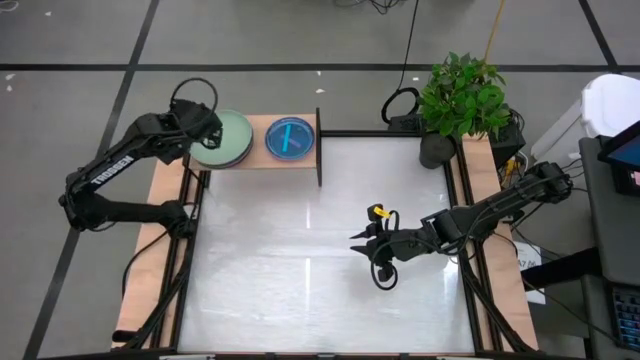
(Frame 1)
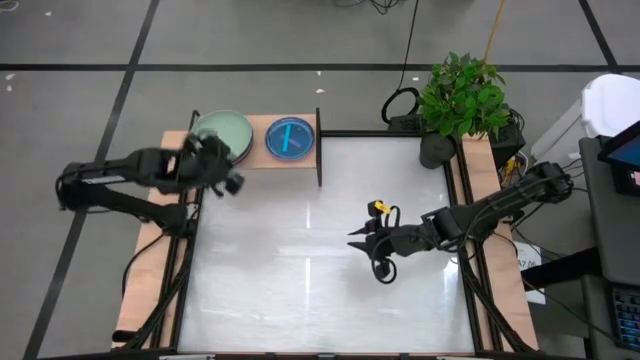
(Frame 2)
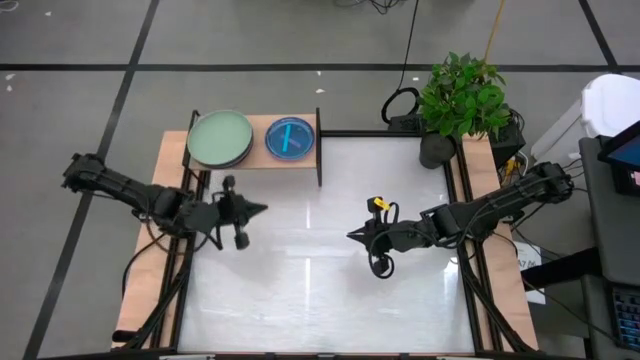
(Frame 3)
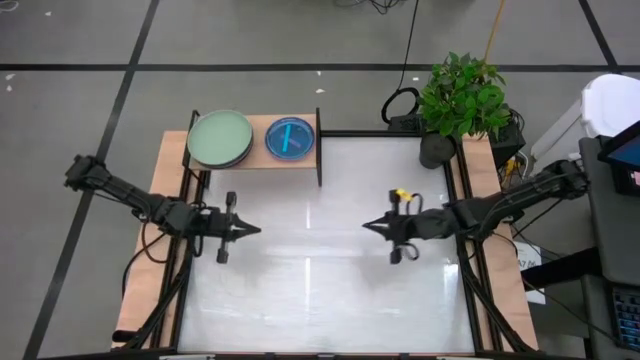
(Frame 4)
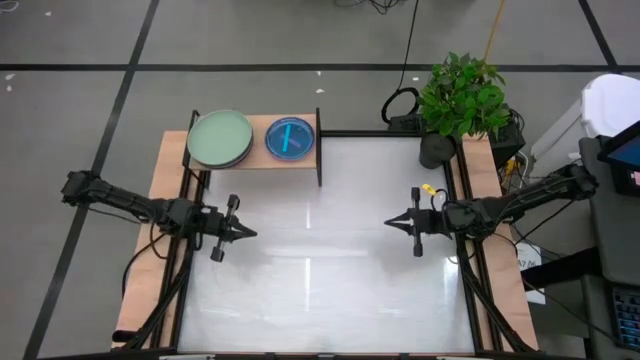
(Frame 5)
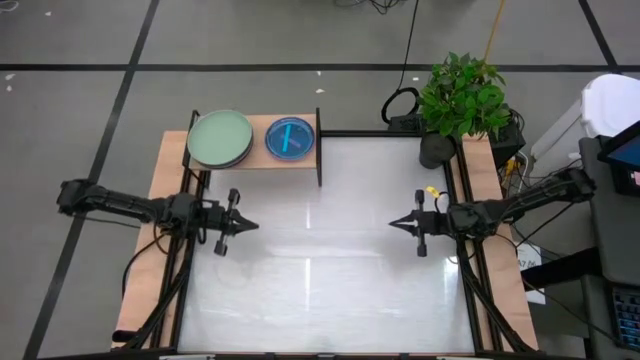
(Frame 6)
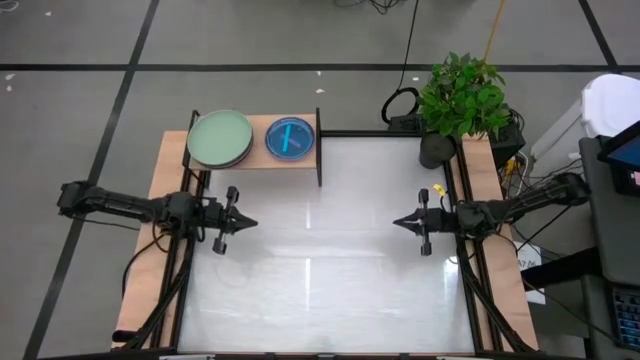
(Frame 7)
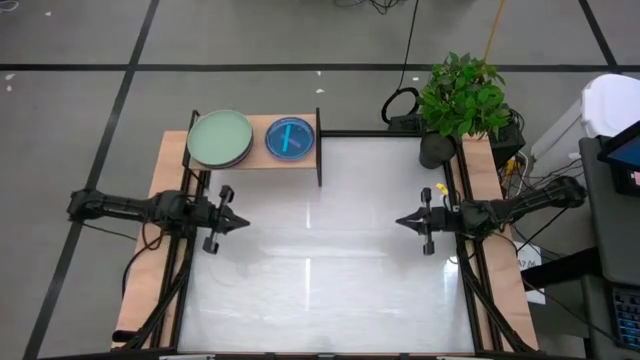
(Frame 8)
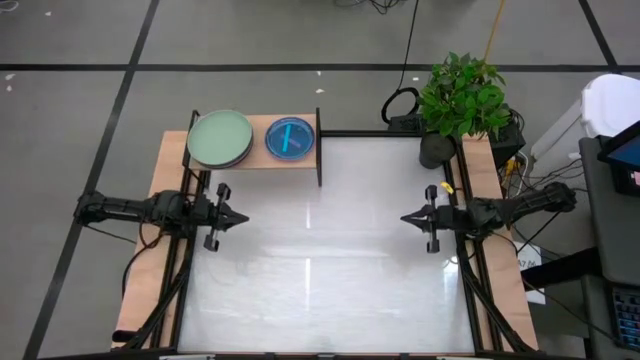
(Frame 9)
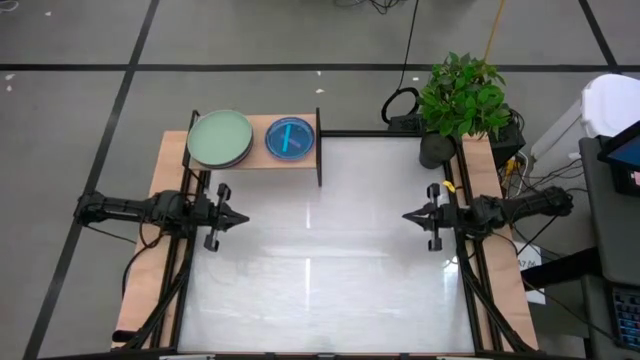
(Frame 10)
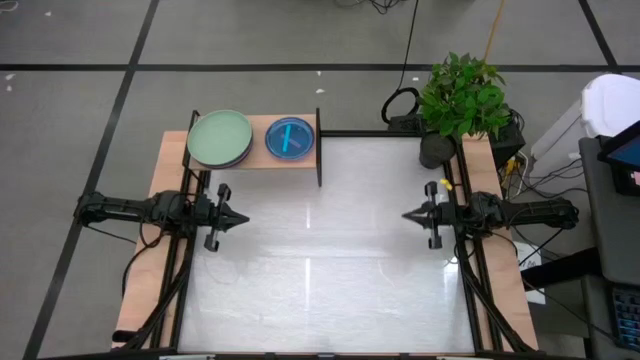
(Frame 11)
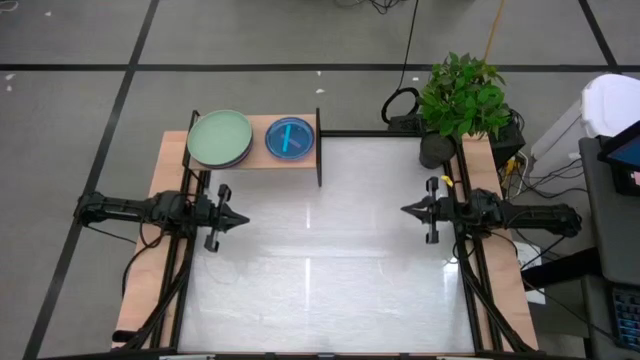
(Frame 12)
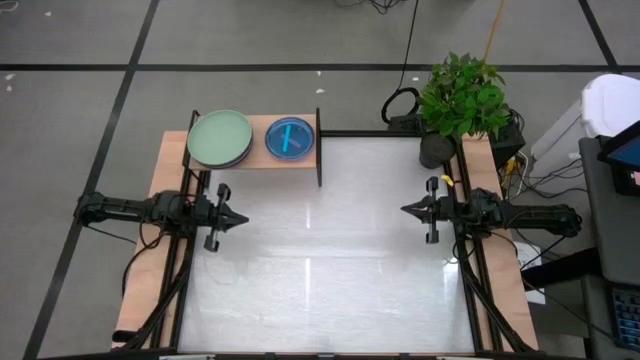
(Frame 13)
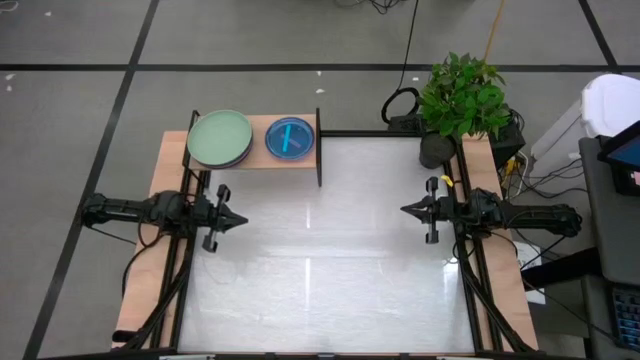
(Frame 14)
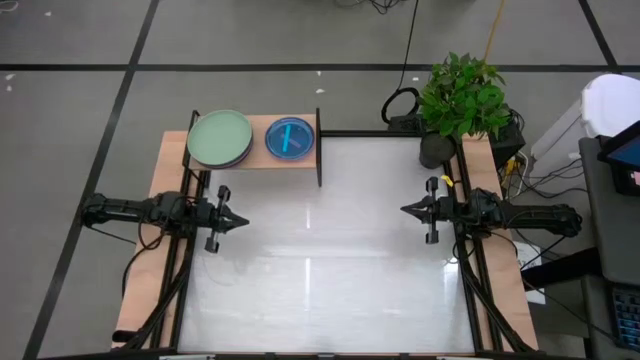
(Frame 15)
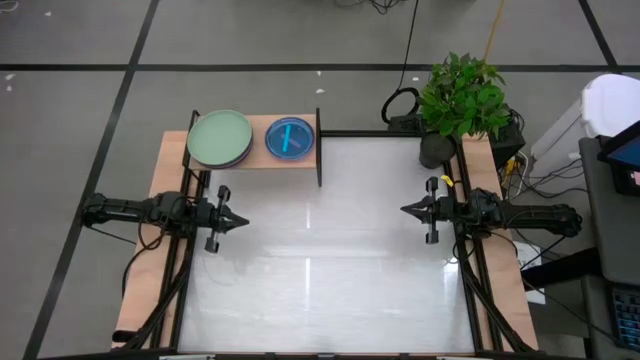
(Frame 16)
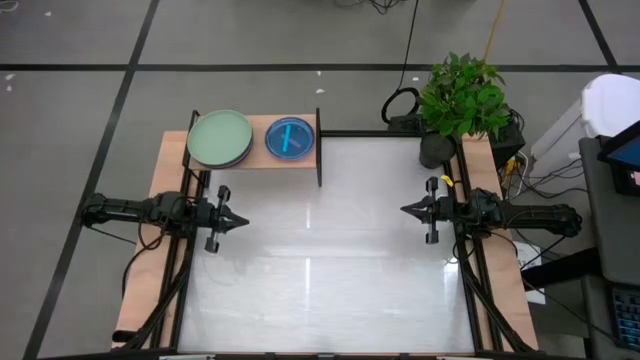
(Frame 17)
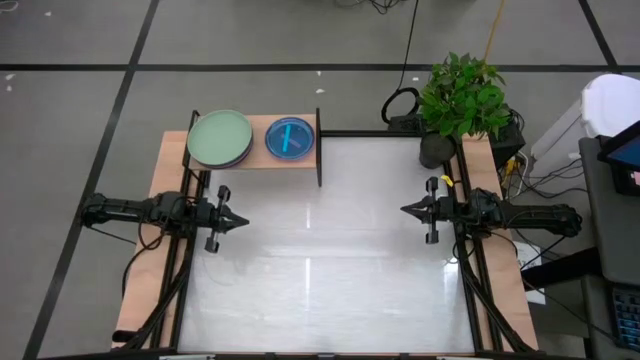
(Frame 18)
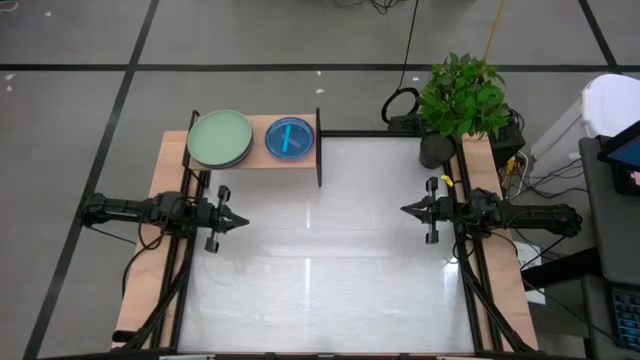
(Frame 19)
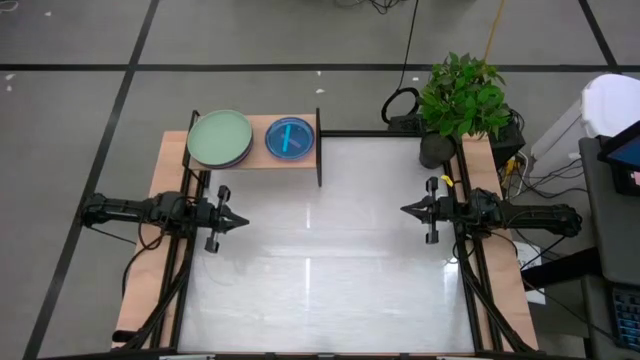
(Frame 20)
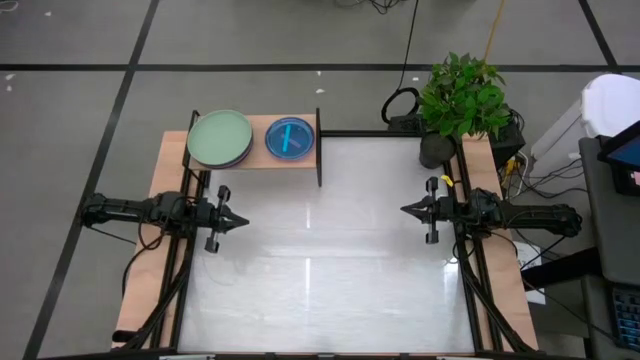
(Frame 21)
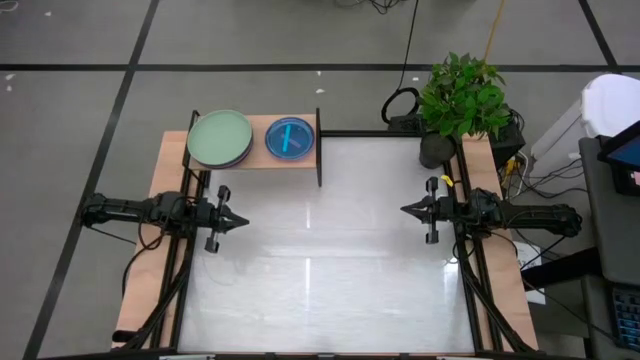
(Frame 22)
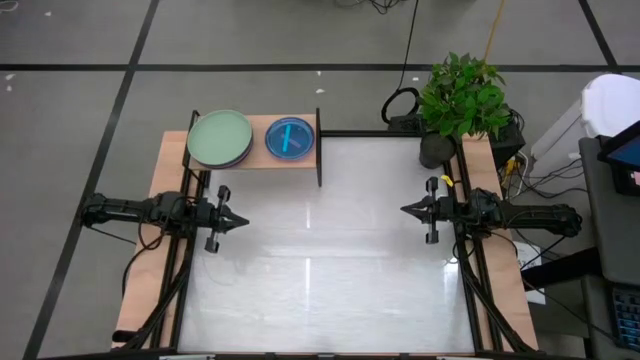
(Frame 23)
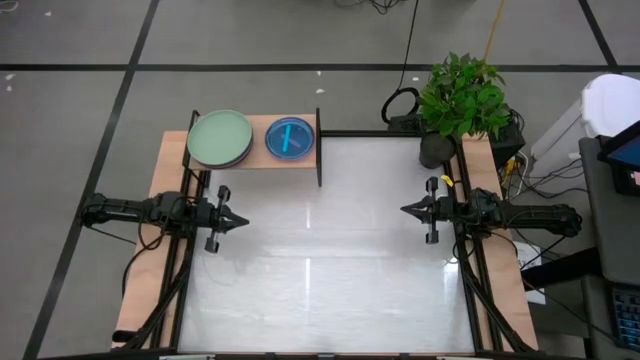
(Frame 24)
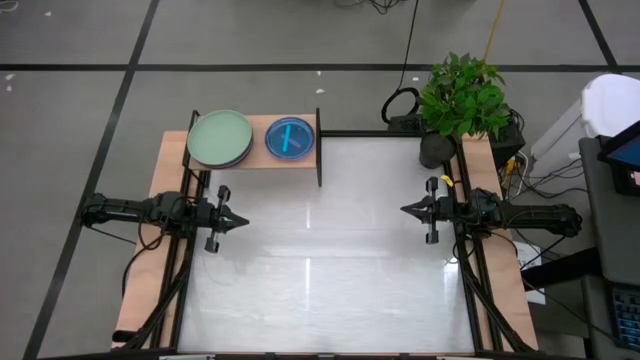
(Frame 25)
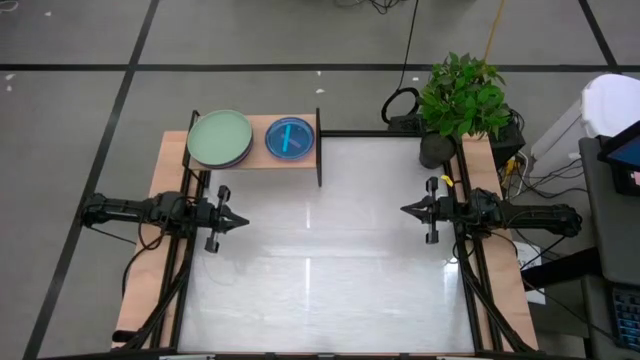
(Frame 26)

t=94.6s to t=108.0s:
Task: Place and stack plates onto a shelf
Return to Home Position

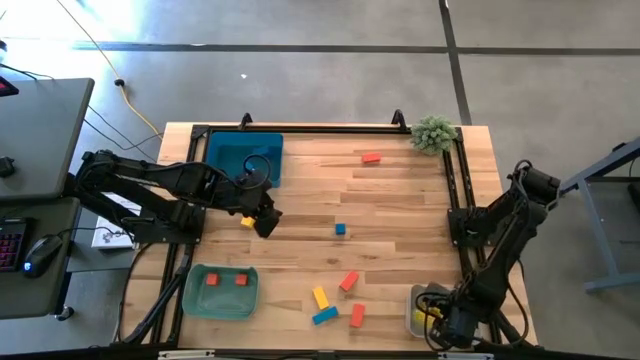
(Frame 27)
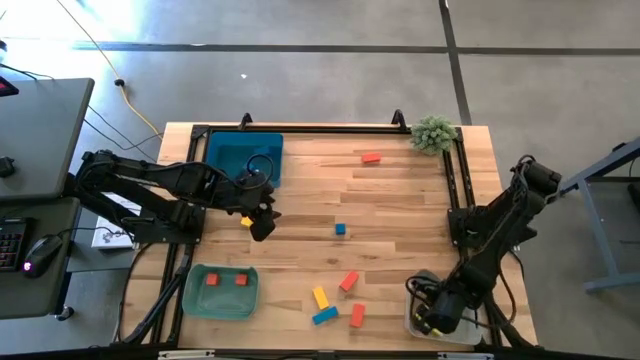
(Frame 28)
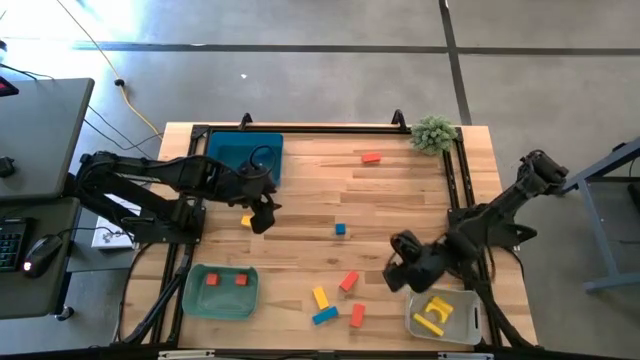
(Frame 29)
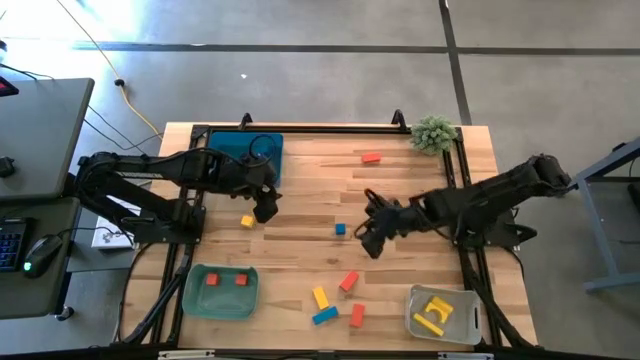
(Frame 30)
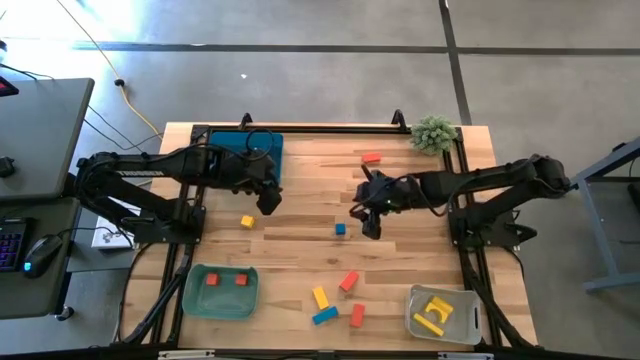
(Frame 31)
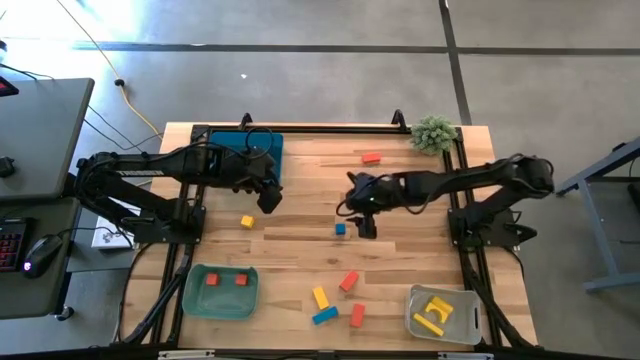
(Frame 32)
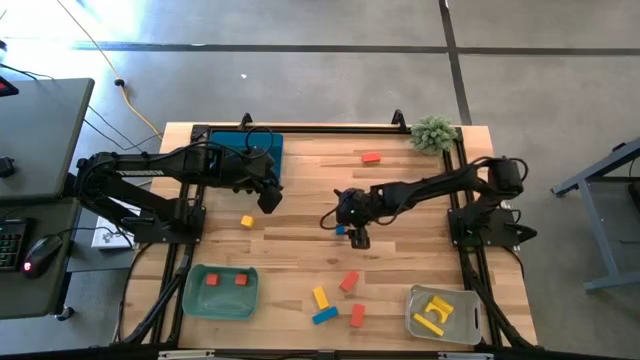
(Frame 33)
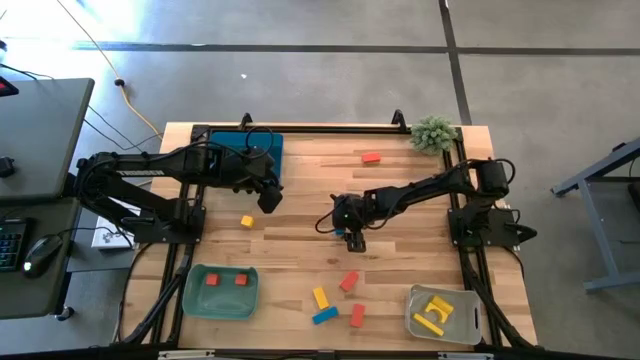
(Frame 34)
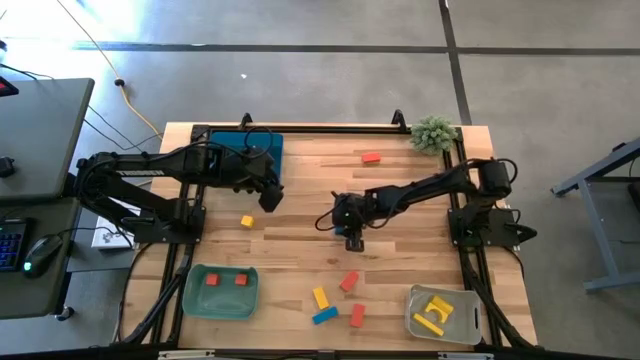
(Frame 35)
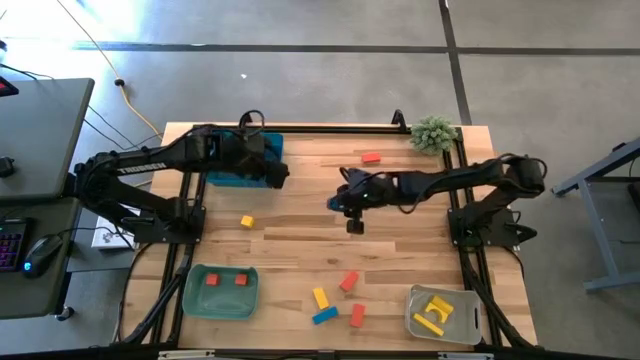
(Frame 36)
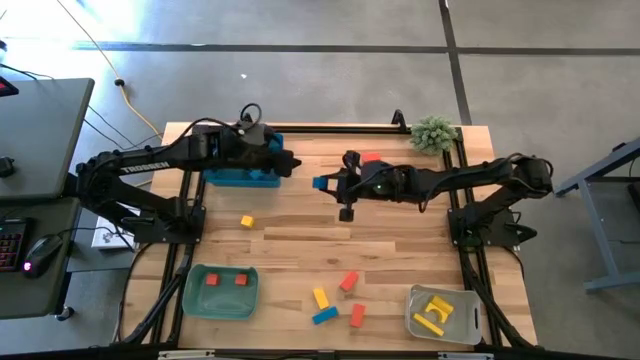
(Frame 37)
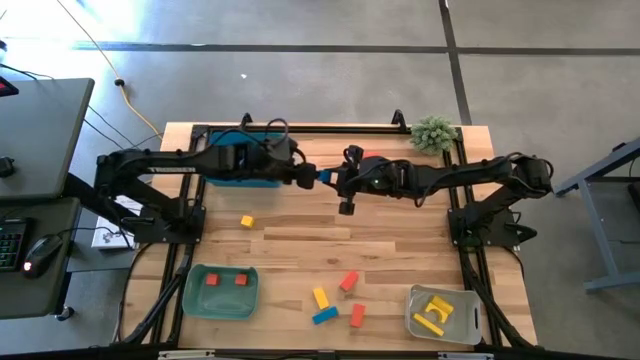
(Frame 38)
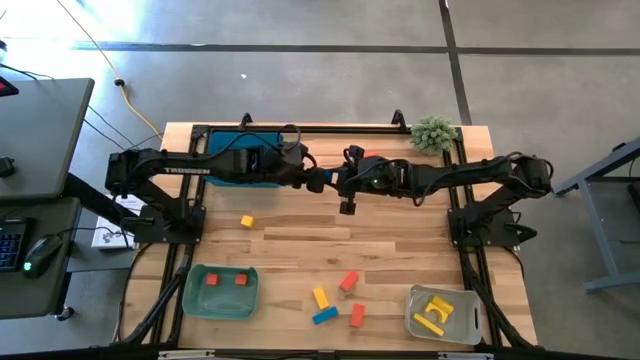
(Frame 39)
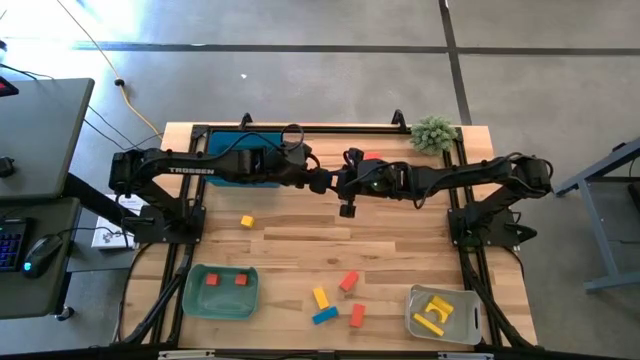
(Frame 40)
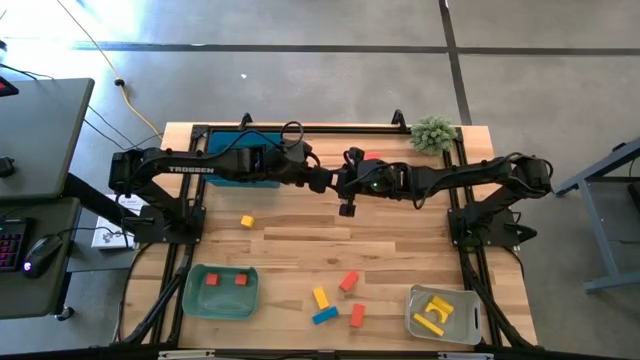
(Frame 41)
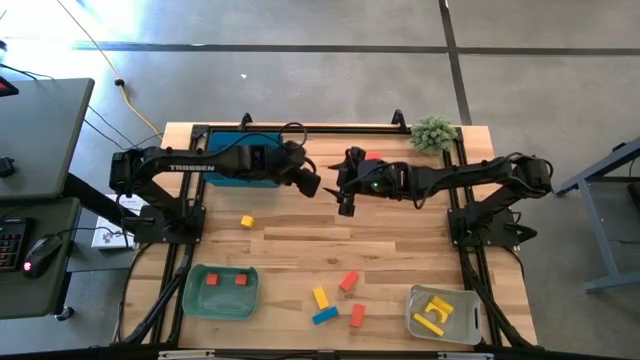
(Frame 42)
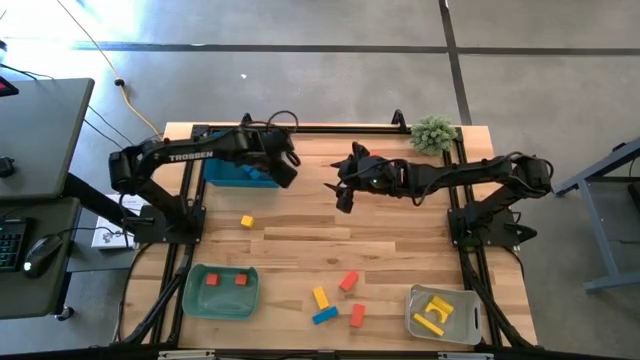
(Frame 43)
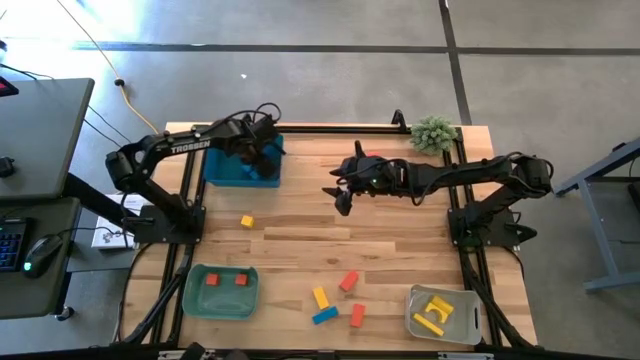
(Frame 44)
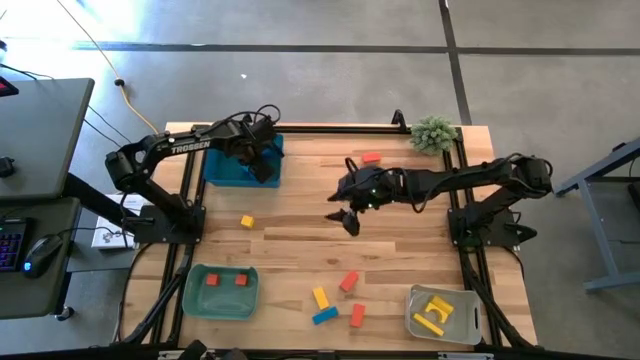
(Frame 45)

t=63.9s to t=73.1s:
Task: Sort & place blocks by color
Put the blue block into the blue bin
